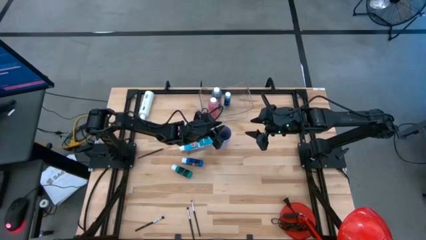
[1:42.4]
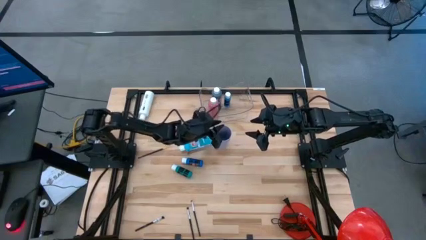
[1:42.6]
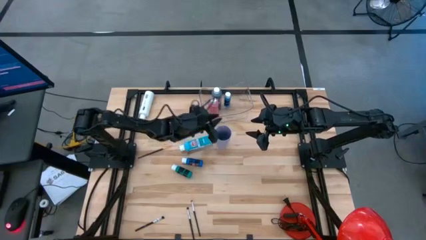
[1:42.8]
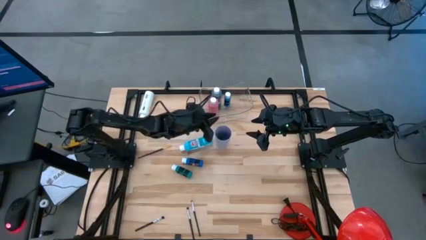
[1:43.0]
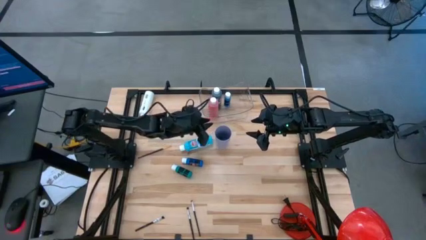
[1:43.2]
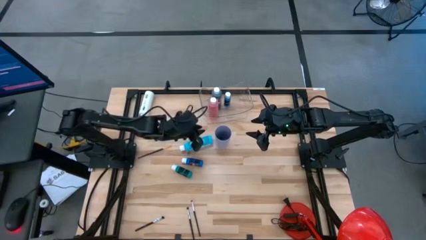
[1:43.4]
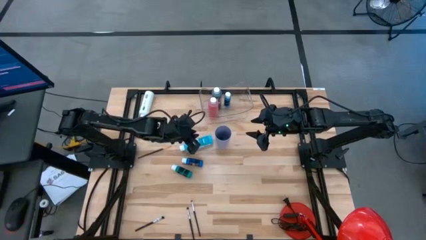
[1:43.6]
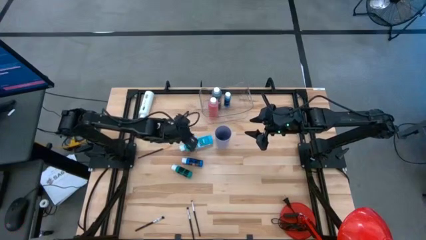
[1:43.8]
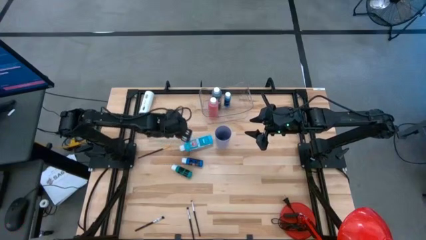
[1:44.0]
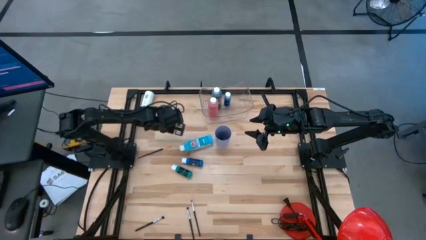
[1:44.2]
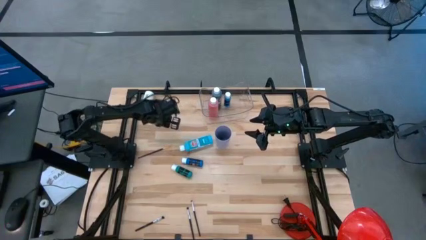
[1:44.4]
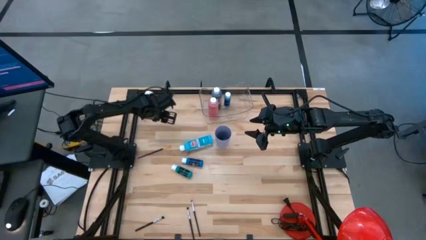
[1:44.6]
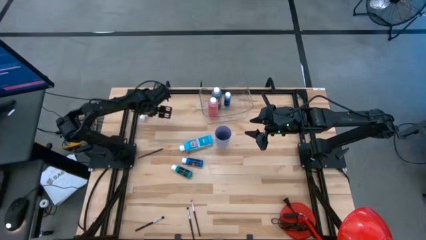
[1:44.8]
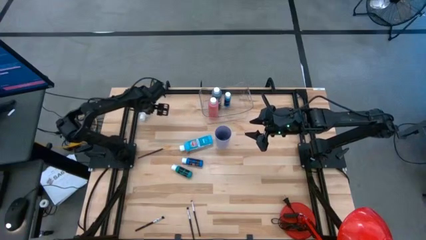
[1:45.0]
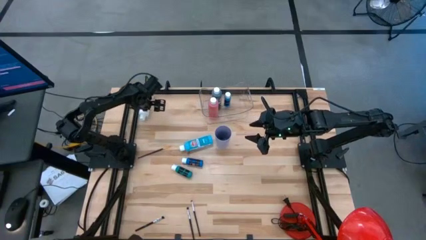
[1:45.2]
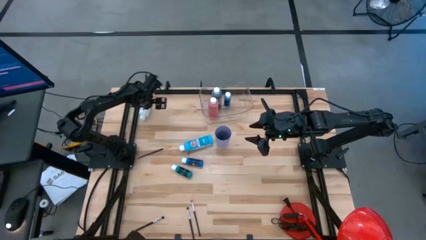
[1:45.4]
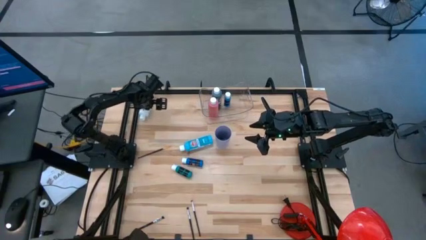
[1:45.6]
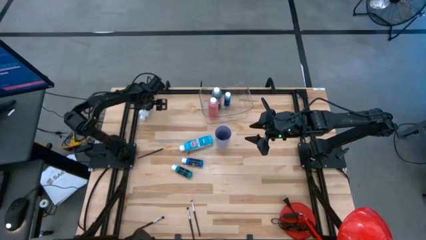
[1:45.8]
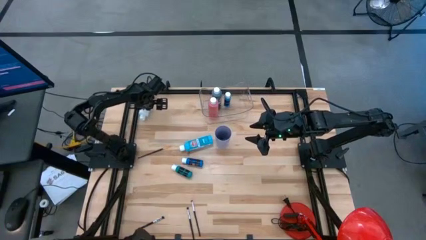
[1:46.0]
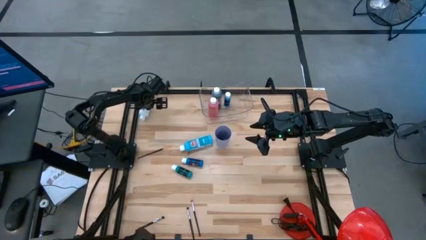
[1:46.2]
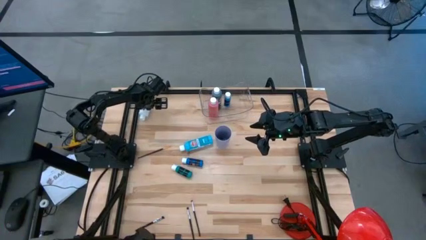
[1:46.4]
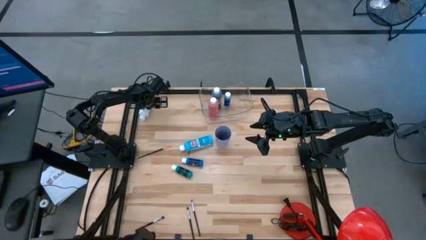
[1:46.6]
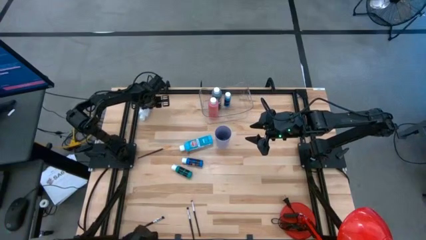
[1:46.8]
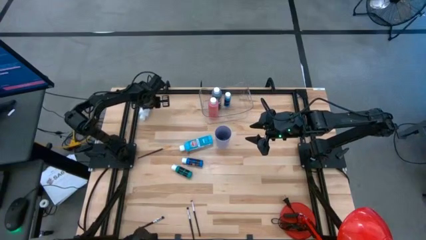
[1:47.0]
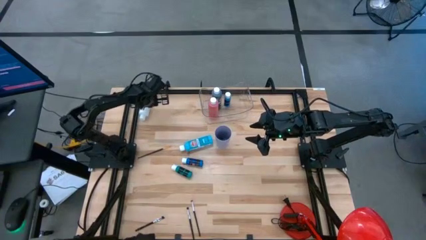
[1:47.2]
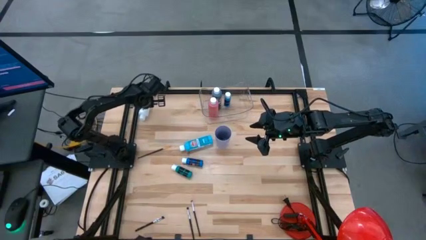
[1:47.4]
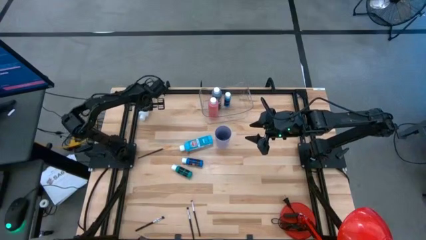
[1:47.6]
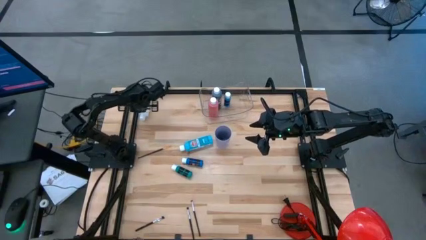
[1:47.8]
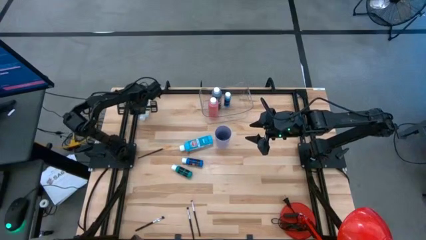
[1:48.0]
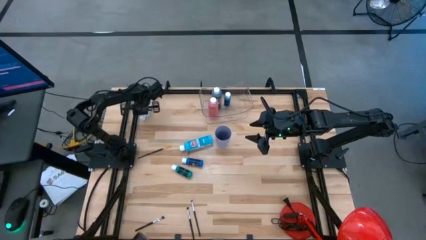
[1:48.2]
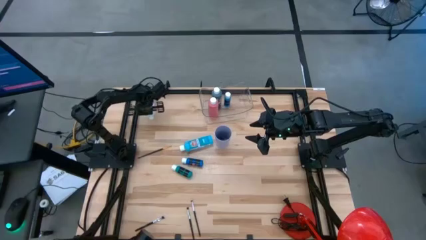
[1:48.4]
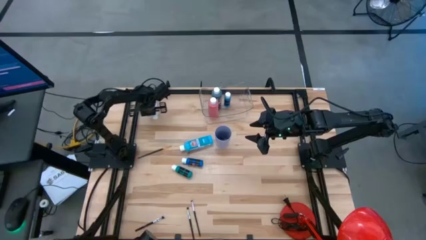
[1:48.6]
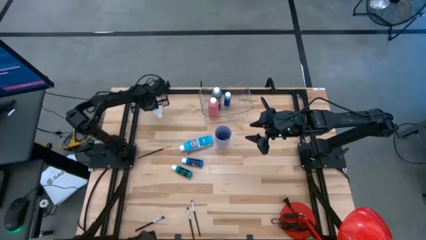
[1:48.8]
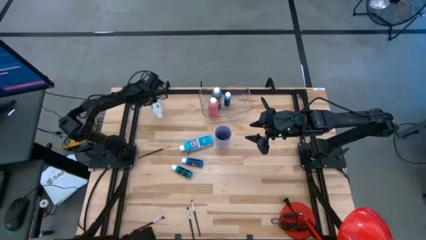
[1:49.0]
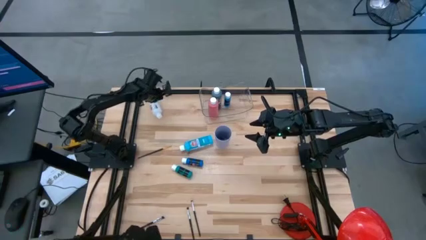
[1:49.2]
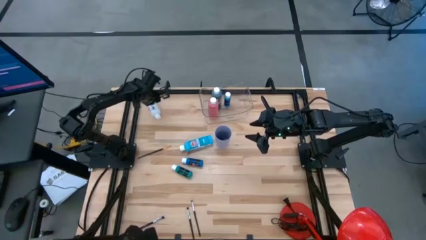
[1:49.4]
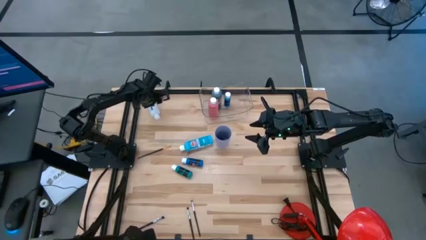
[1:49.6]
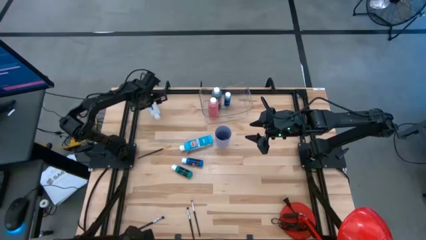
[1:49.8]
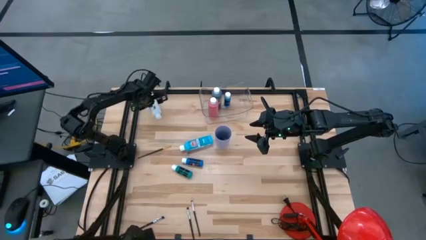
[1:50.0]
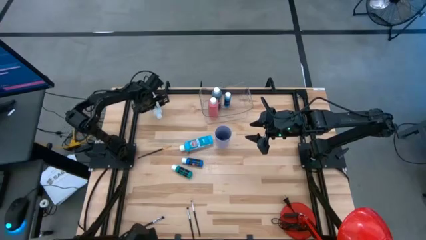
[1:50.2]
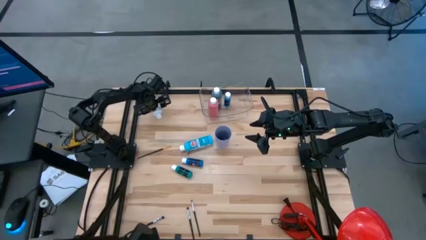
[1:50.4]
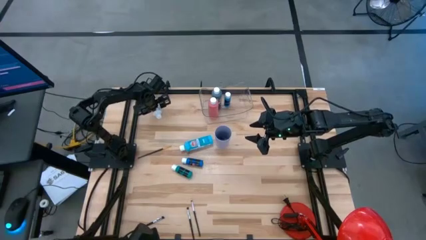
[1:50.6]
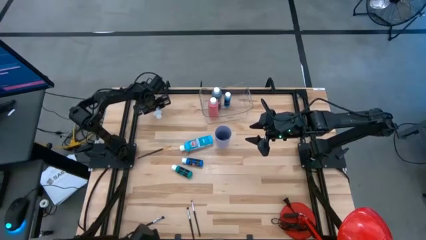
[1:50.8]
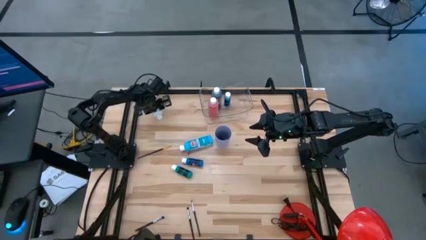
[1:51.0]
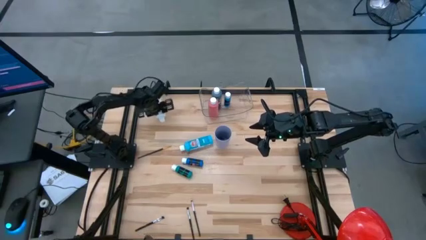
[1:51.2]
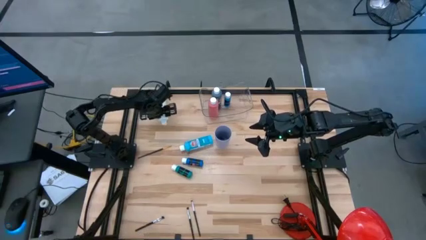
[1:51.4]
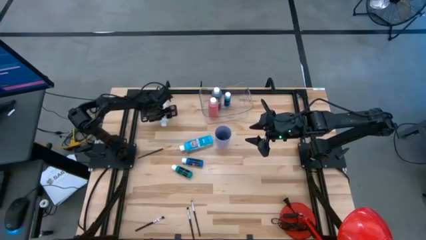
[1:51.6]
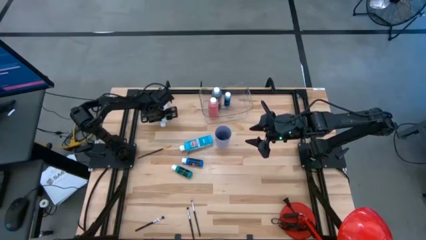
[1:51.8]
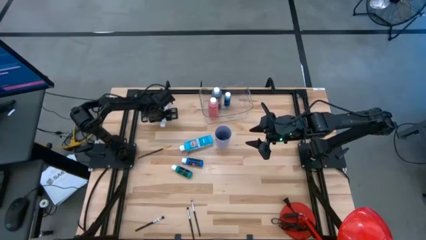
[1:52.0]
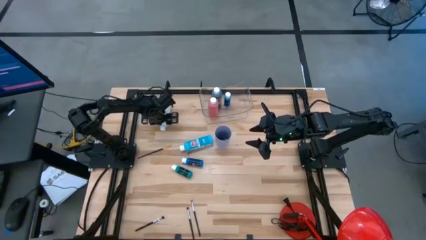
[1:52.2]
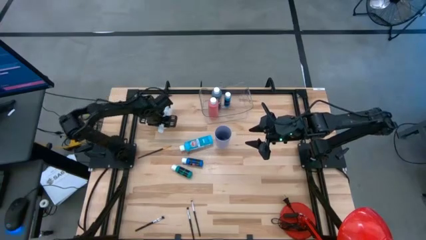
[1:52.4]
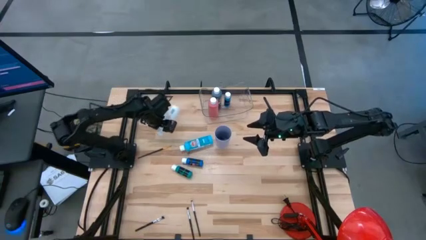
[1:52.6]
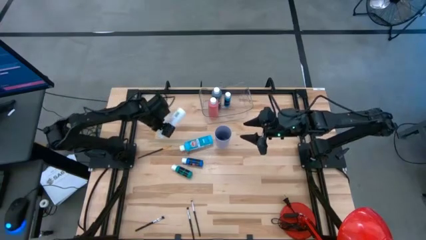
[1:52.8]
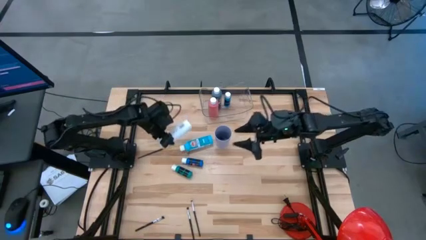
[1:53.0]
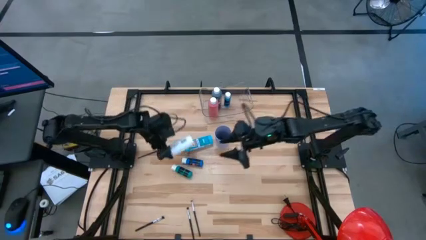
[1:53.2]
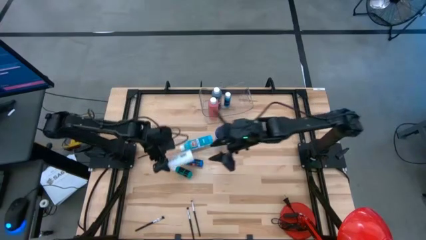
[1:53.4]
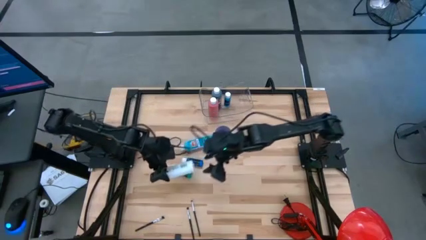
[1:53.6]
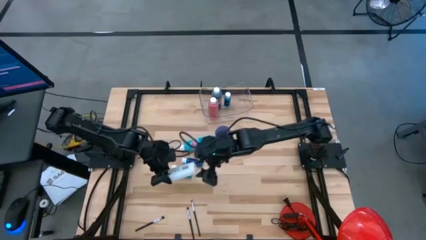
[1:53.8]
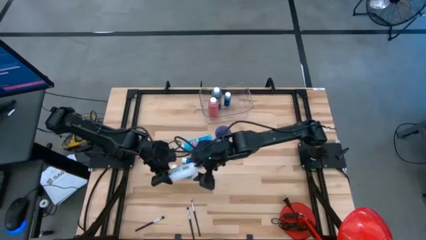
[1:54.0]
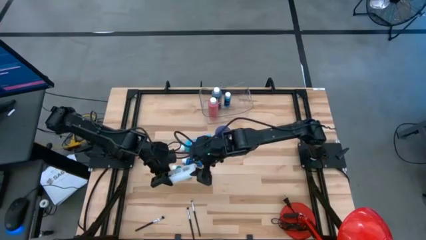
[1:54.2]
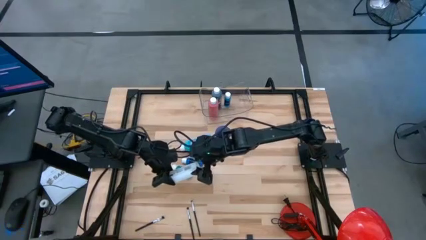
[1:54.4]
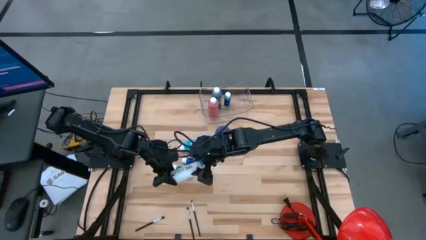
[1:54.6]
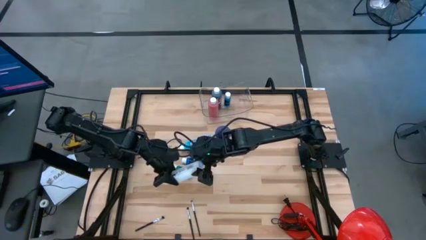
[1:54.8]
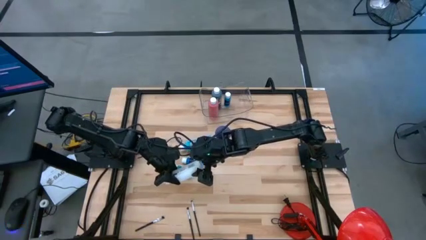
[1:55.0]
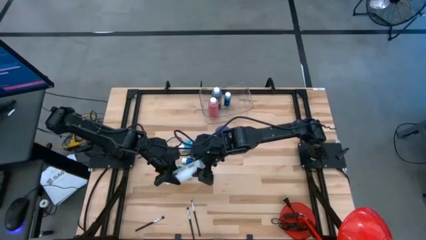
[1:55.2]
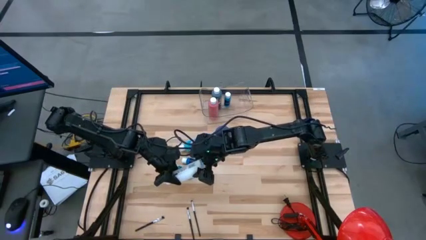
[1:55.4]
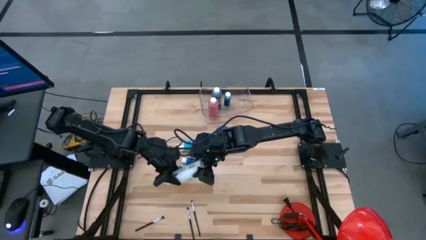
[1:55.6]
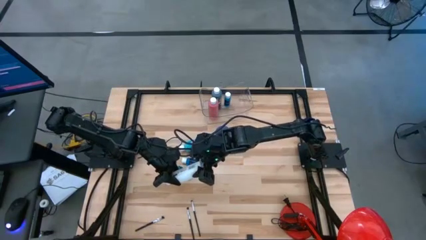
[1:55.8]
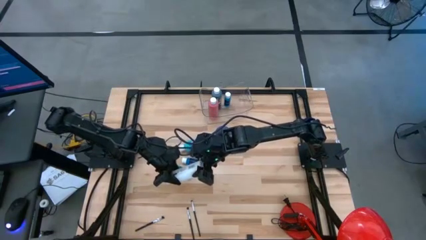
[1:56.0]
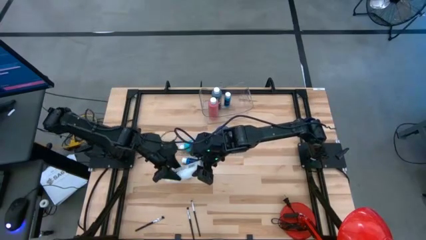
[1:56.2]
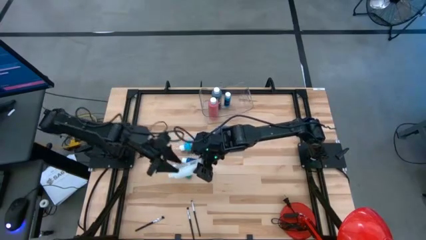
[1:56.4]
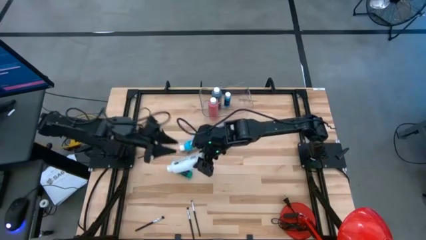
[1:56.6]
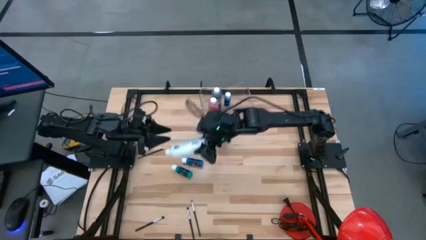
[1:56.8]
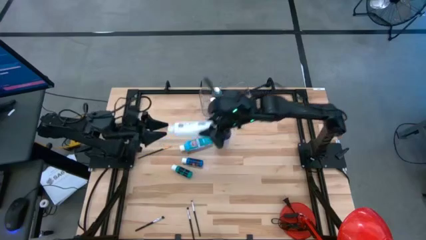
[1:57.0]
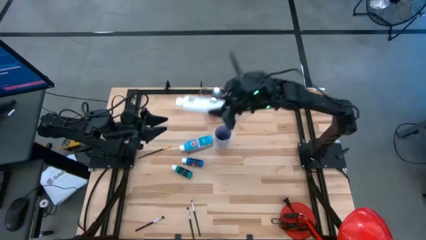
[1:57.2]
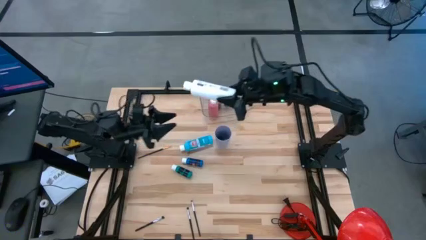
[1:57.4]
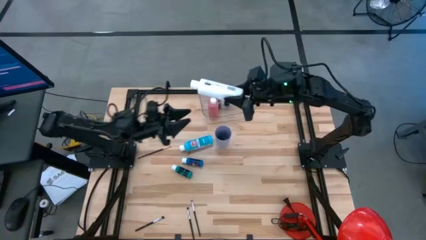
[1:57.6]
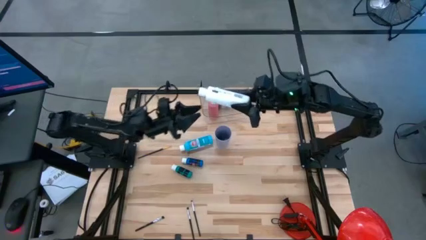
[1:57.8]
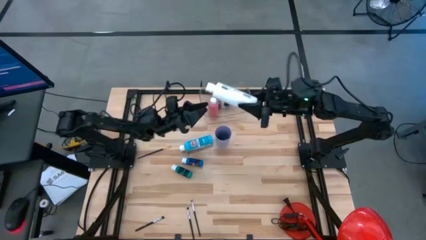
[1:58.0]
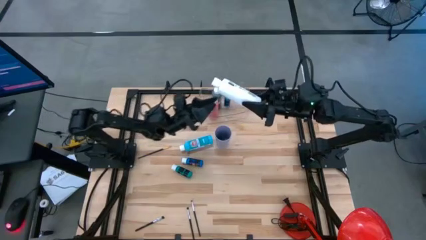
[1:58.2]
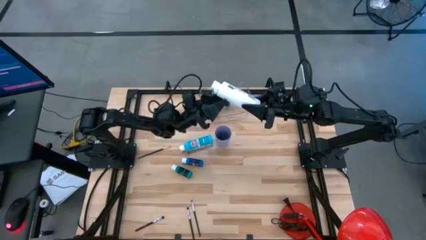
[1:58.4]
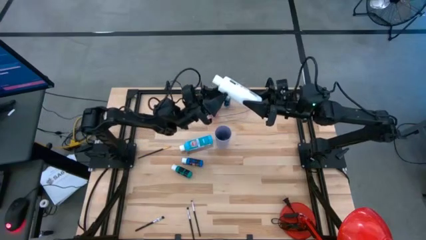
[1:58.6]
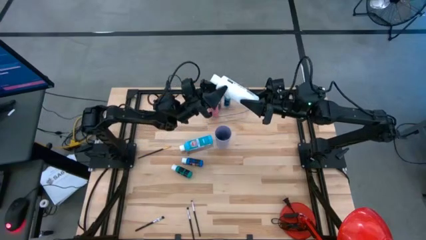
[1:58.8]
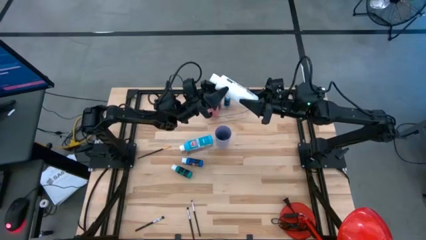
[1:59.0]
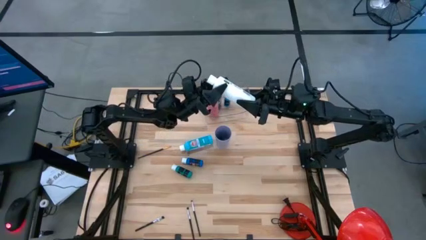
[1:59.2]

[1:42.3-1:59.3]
Task: Pick & Place Paint Supplies
Put the white paint bottle into the transparent bin
